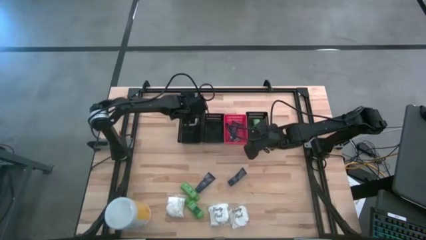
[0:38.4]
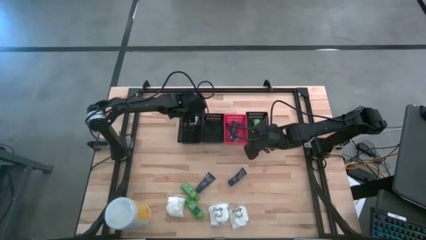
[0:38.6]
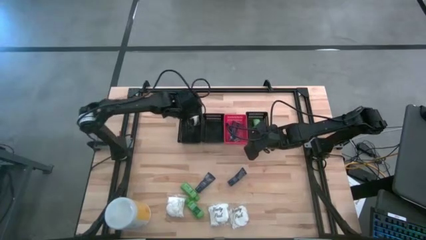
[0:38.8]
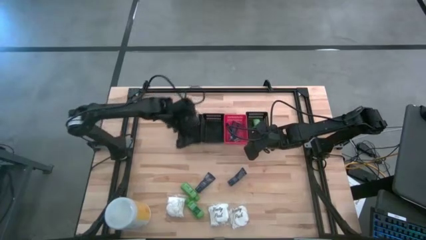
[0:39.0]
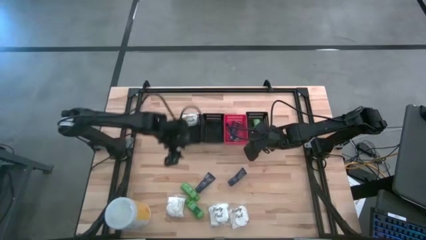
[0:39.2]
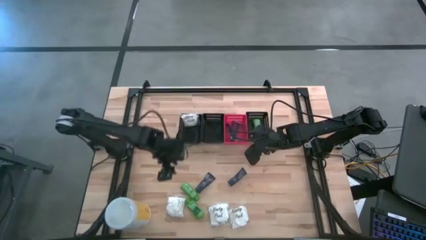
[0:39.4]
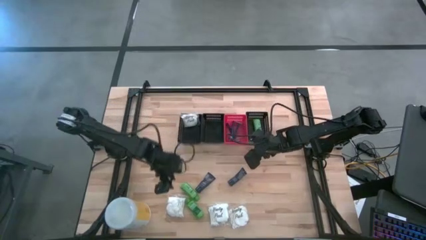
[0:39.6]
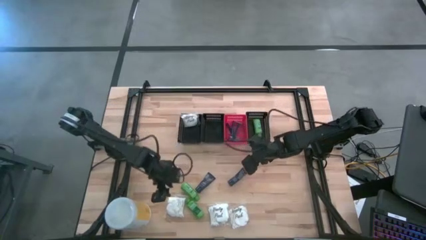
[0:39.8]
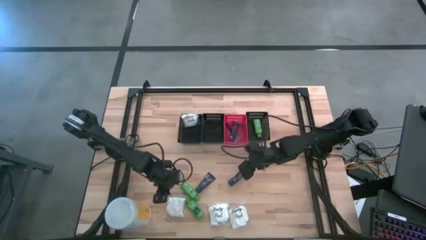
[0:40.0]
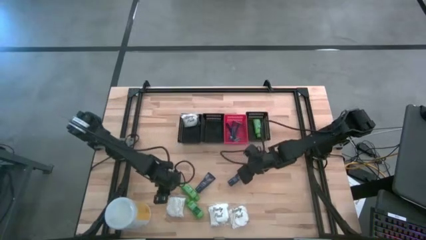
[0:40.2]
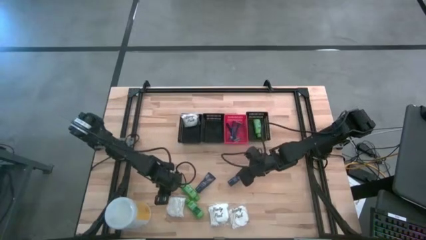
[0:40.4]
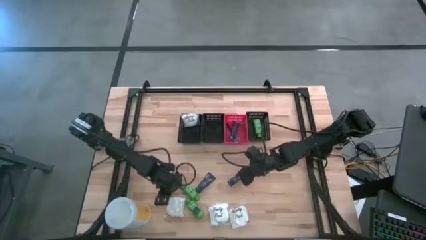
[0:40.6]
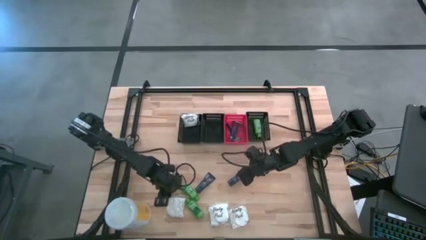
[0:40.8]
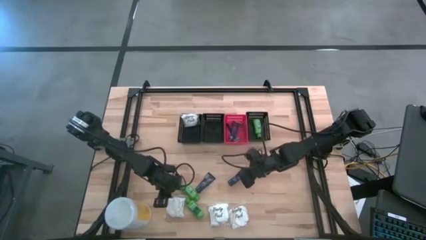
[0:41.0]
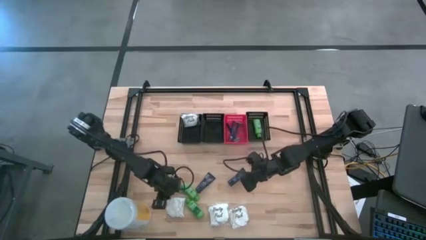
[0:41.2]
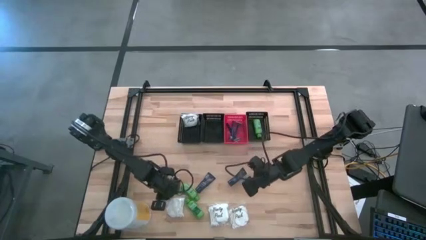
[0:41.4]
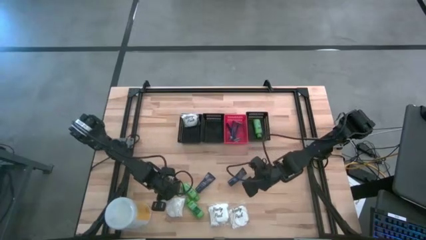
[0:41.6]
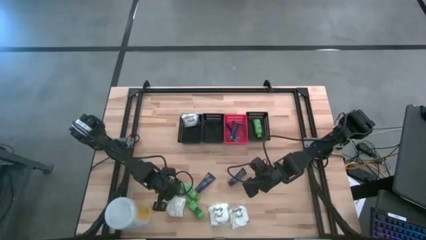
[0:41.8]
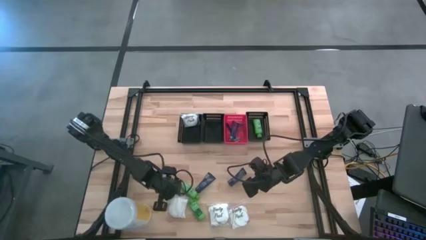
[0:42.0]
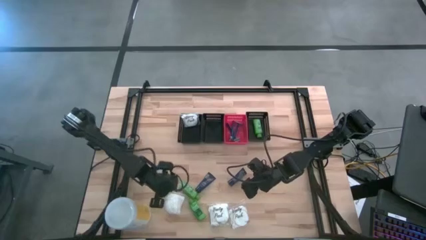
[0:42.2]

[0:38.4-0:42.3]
Task: Pick & Place Travel size toiletries
Put the cotton pack into the left black bin

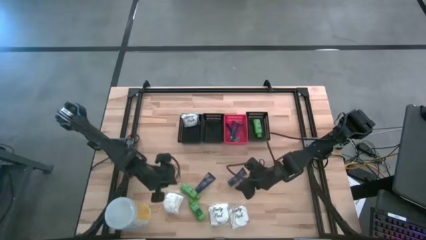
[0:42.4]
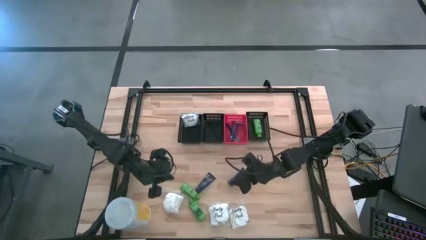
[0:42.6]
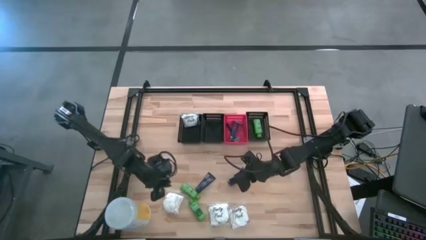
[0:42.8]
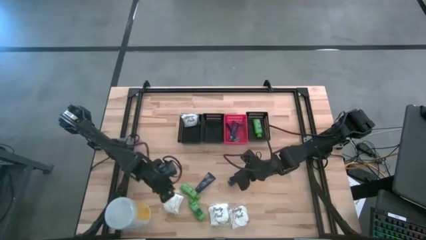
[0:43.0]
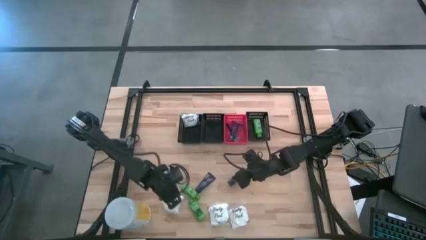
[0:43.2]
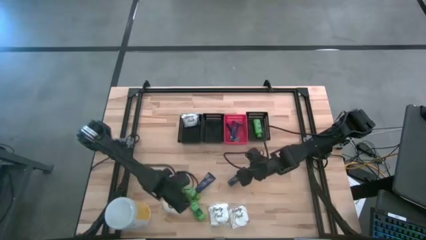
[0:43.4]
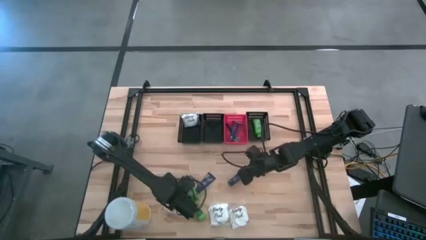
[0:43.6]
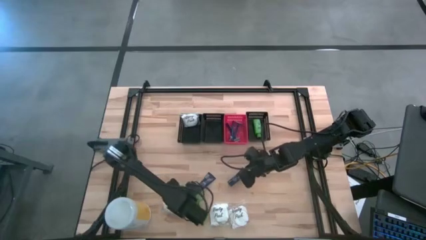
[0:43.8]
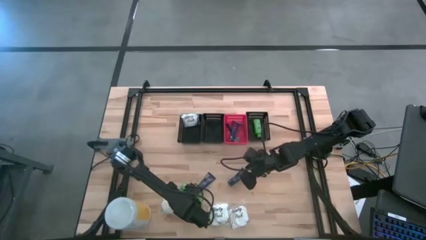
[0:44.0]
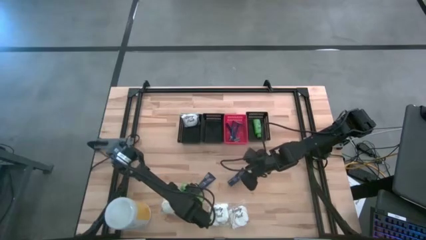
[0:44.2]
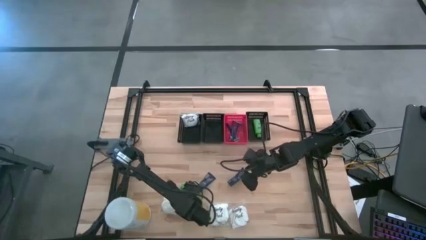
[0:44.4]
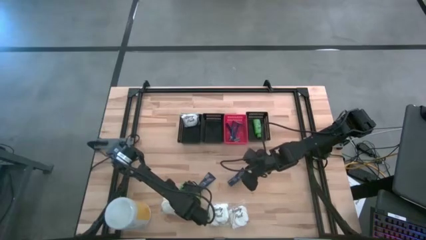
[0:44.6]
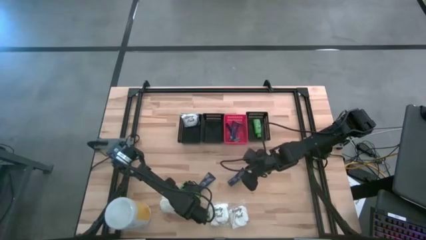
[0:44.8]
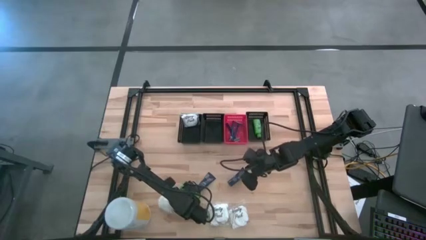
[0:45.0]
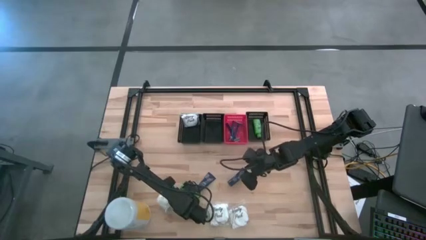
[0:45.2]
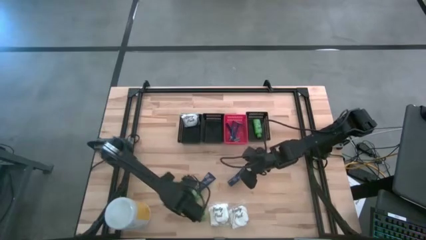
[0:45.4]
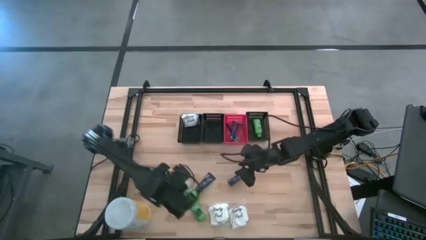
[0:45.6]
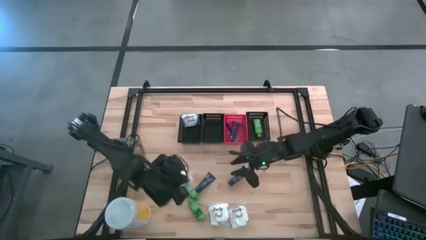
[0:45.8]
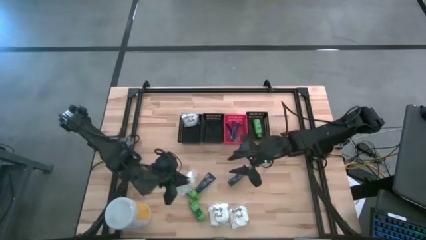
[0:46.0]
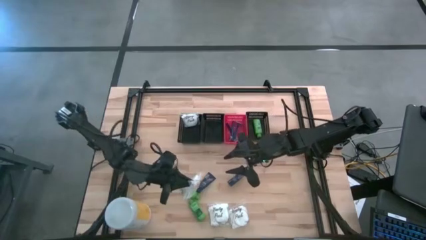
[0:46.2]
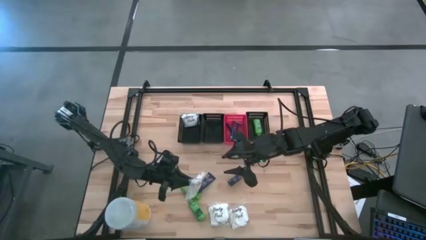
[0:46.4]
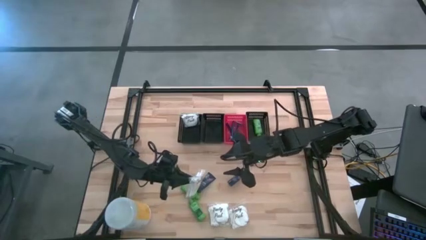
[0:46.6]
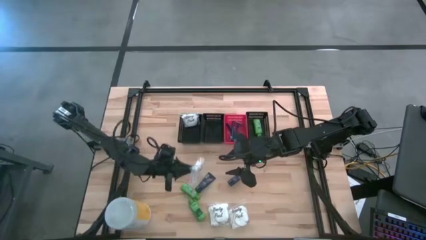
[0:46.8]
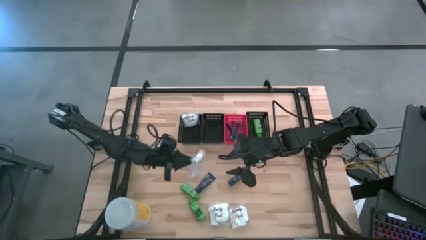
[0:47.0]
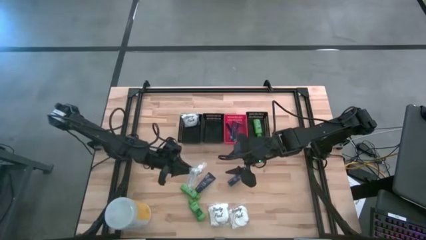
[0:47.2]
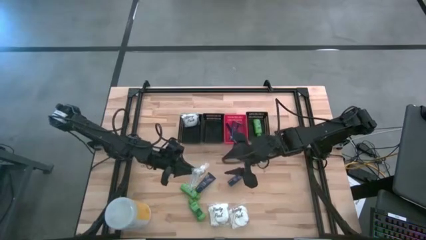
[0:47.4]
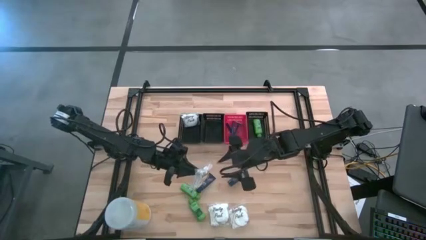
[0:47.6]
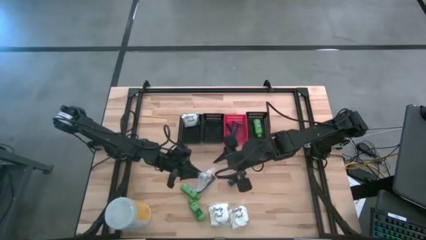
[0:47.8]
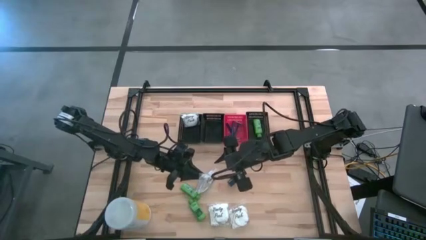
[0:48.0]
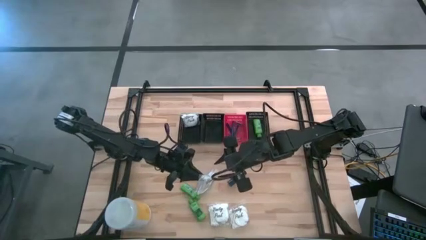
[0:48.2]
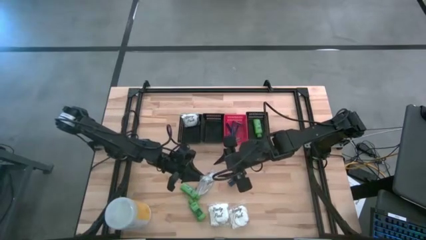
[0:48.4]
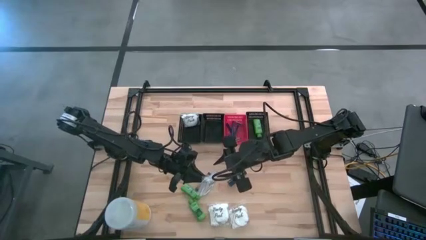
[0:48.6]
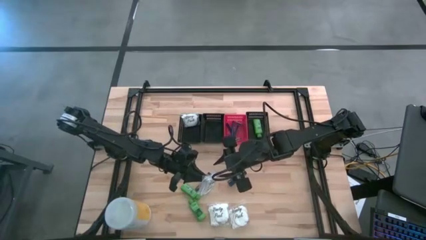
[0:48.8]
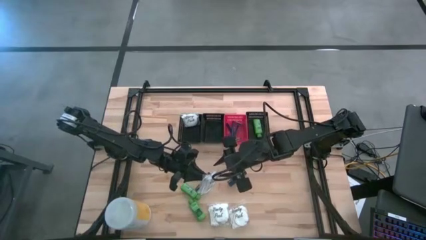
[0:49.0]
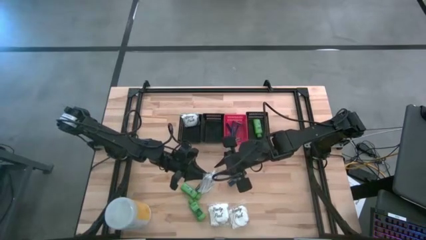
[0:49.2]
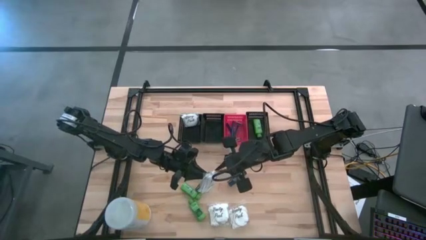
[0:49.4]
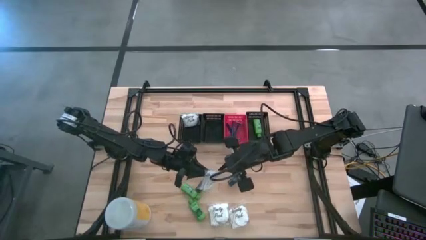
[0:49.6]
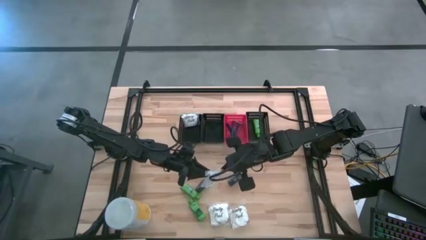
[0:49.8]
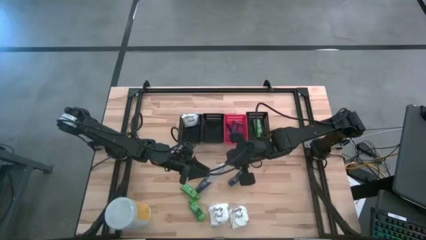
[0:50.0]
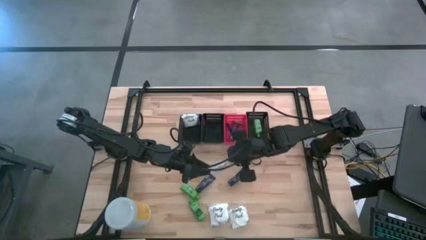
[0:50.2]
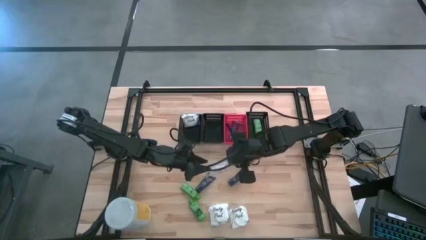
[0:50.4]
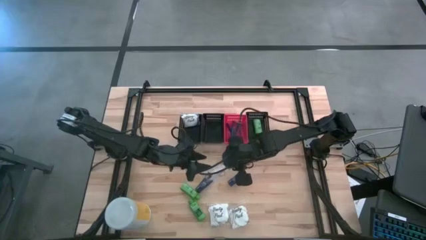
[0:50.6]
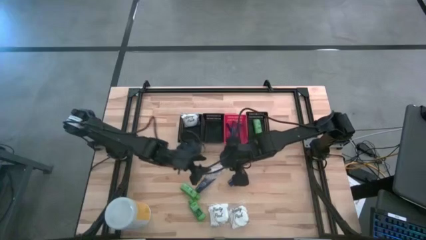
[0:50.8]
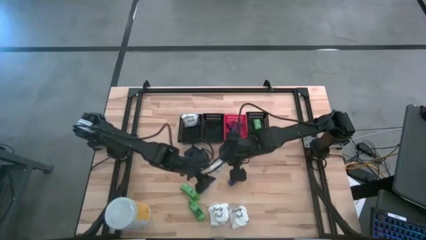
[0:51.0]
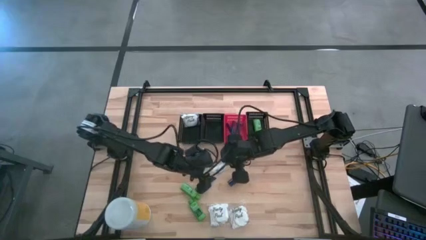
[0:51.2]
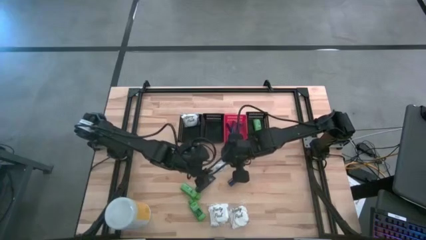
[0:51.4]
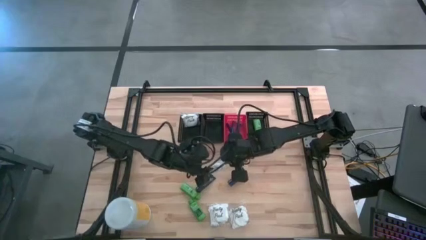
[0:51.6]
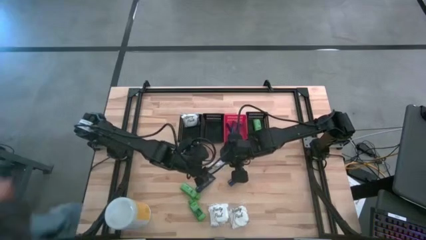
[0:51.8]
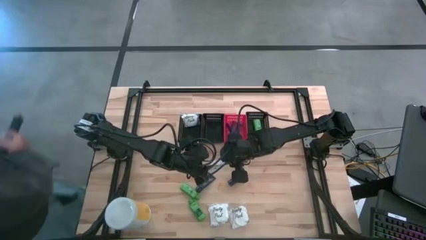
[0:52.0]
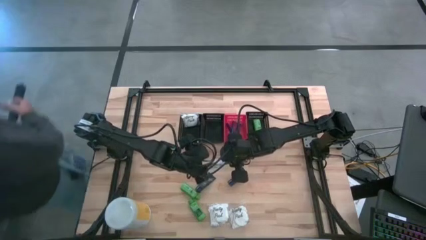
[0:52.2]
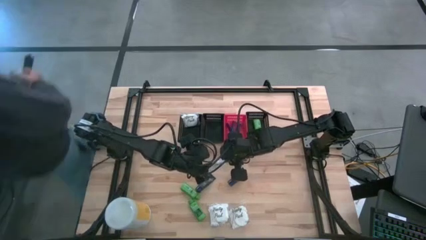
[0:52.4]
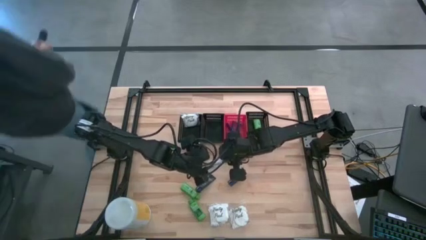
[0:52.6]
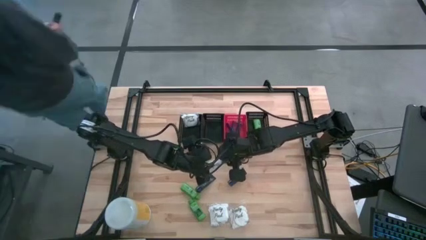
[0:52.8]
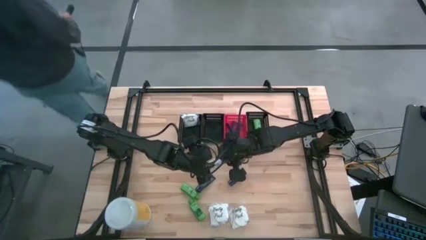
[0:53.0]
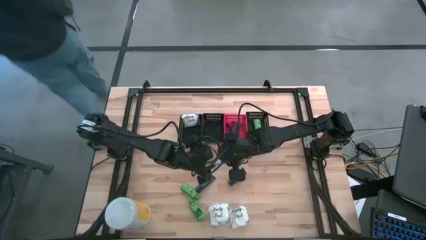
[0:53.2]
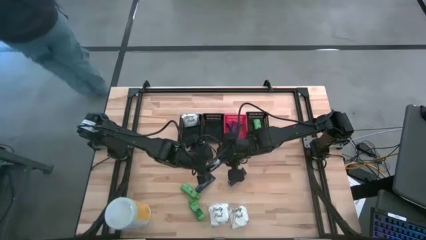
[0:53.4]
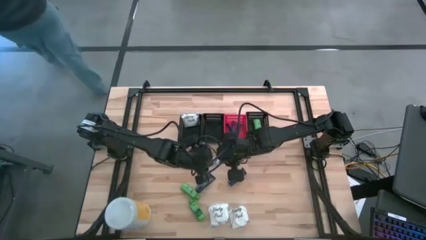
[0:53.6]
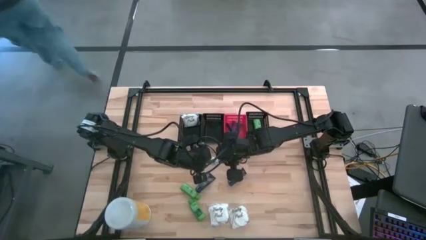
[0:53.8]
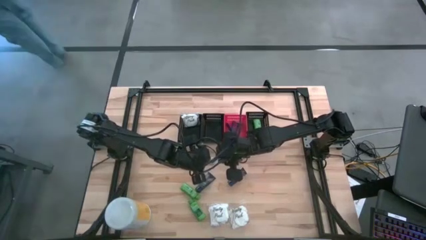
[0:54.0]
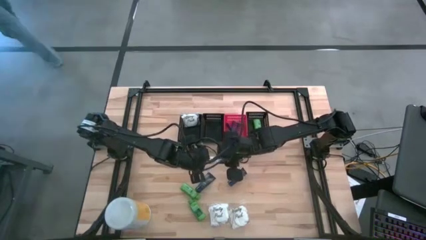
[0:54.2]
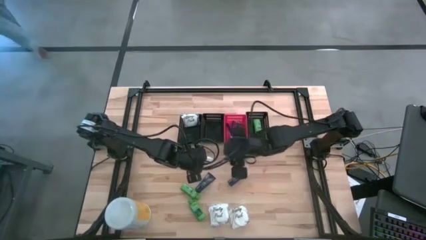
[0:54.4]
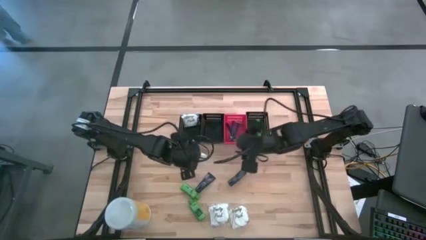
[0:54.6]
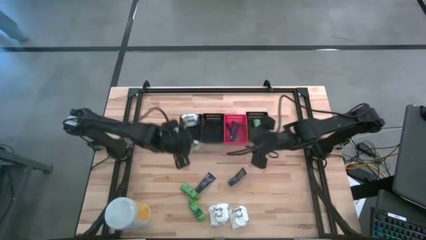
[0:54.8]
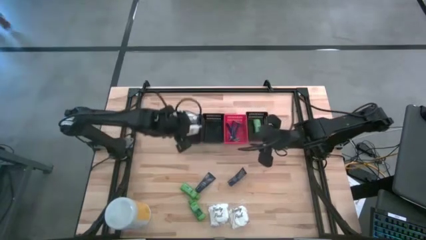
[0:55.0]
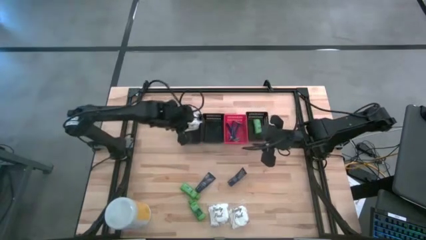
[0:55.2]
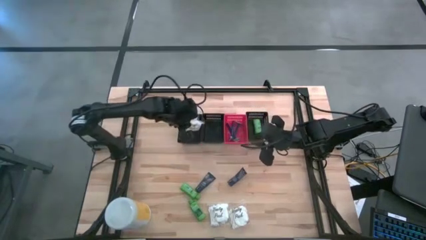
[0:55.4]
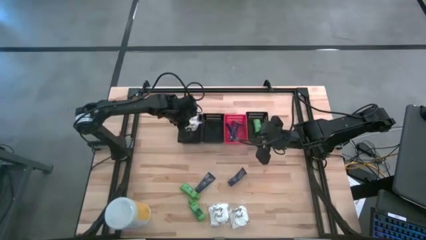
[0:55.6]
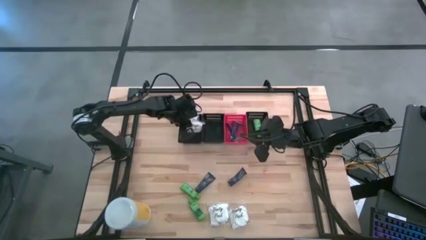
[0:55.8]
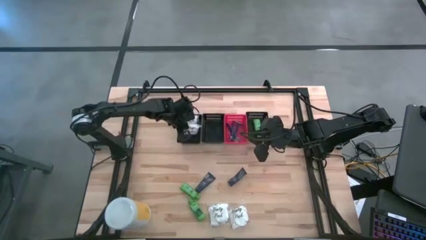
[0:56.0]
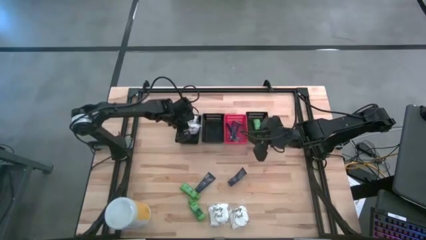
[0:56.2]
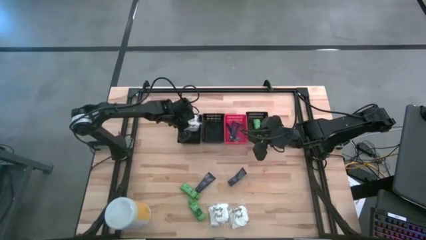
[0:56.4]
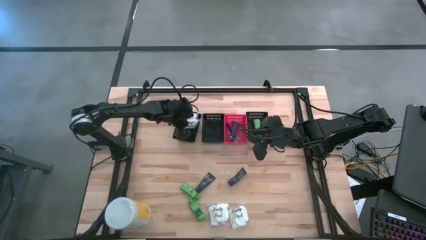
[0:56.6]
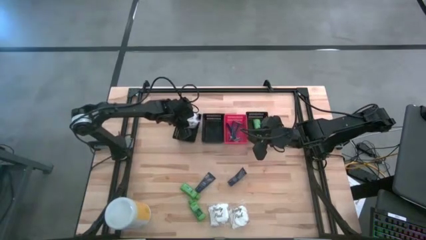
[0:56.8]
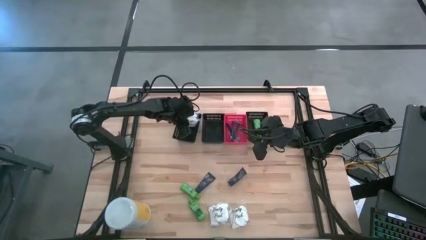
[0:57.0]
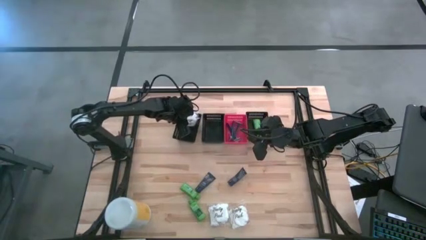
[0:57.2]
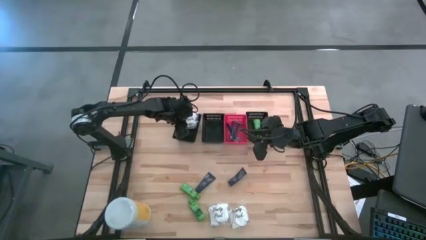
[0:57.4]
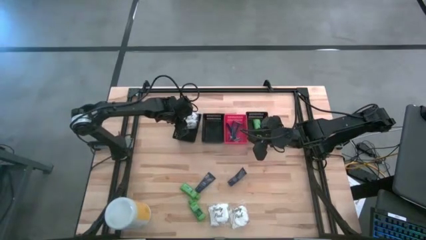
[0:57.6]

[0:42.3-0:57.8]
Put the cotton pack into the left black bin
